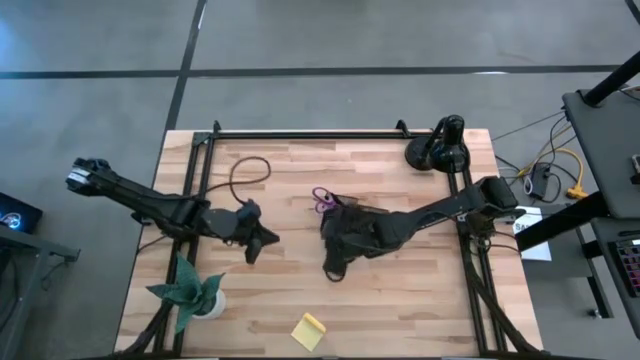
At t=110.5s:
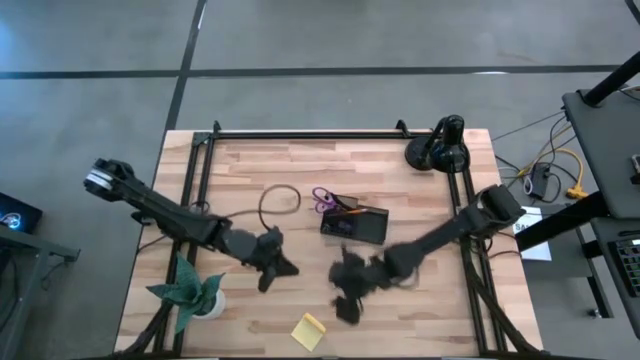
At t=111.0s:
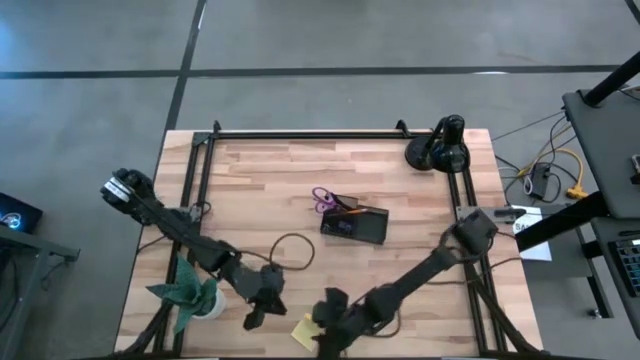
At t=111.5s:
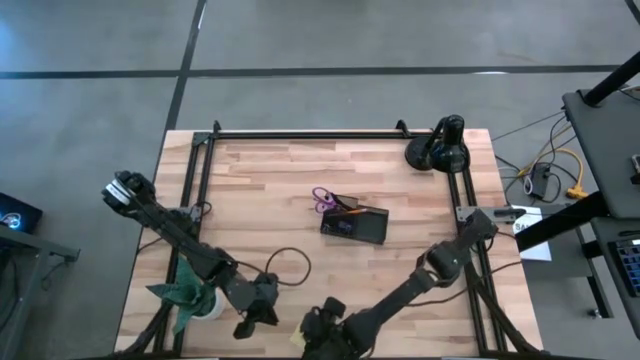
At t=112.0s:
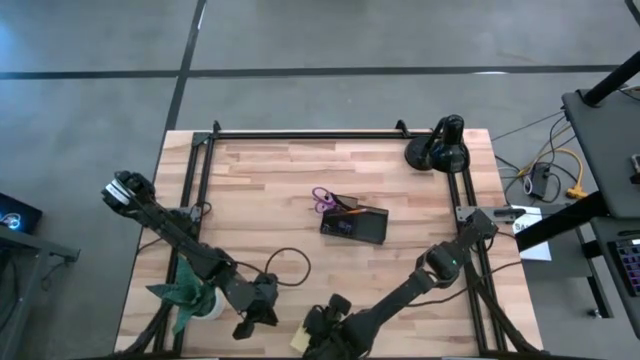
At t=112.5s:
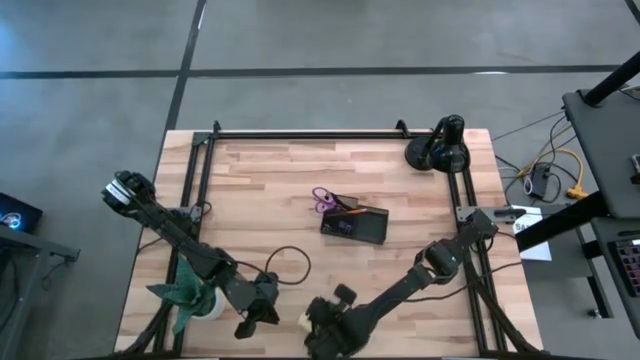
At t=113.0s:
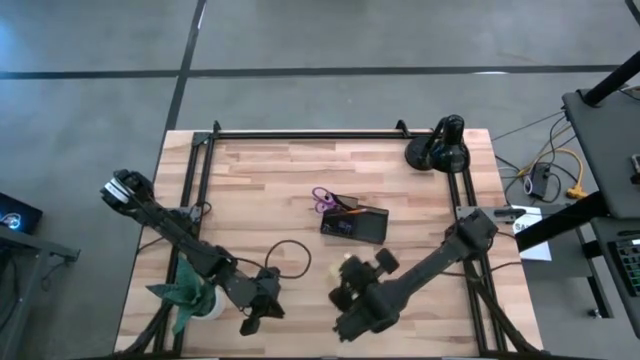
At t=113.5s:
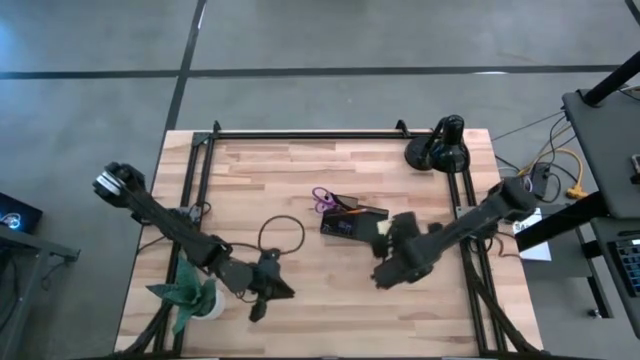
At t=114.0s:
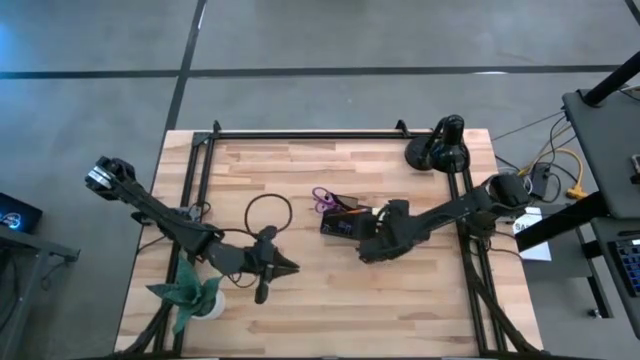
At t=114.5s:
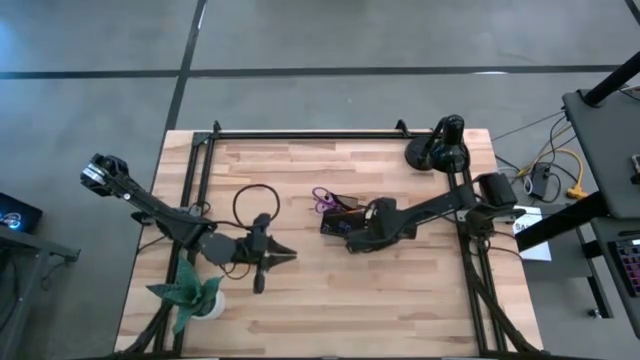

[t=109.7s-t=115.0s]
Task: Pick and place office supplies into organizer
Put the yellow sticky notes into the black desk organizer

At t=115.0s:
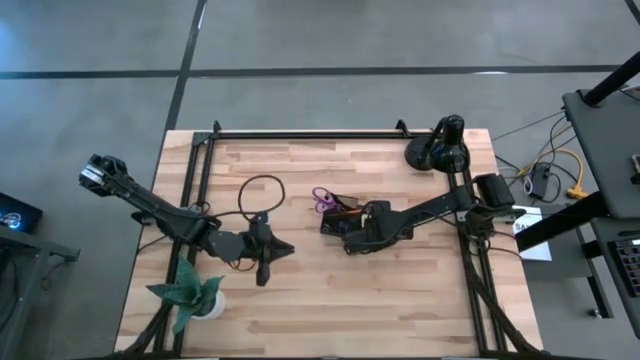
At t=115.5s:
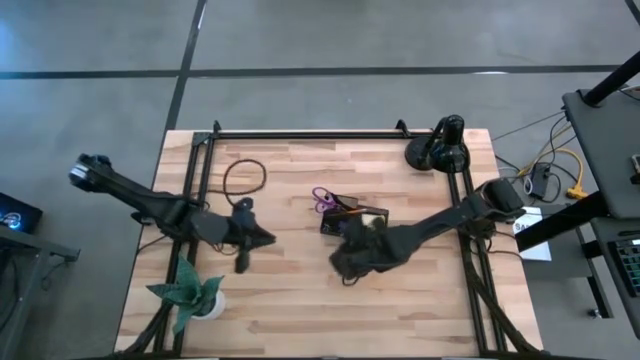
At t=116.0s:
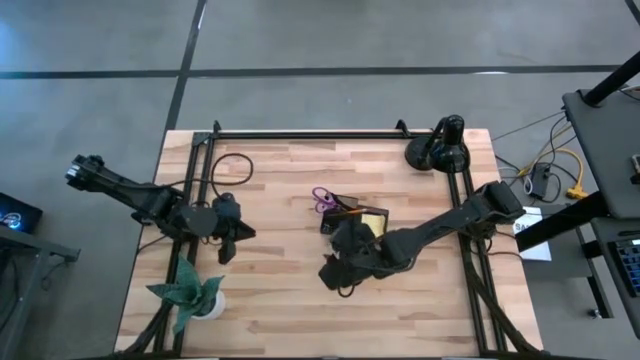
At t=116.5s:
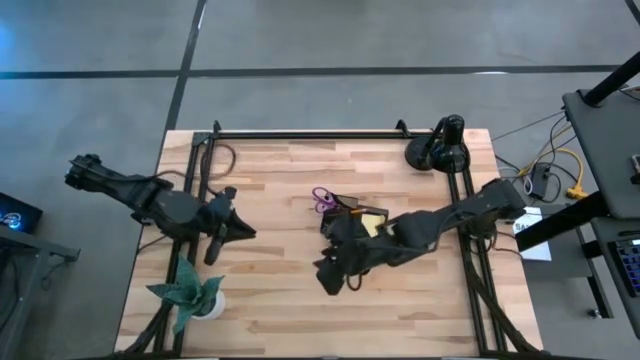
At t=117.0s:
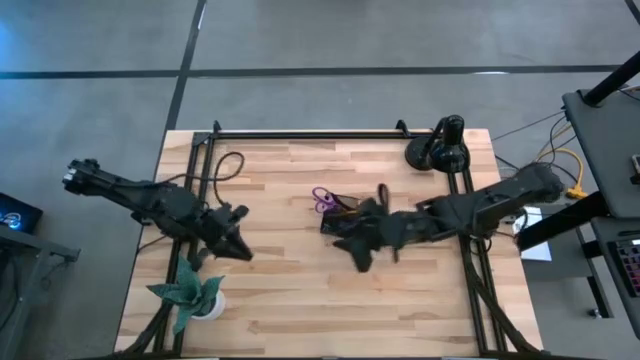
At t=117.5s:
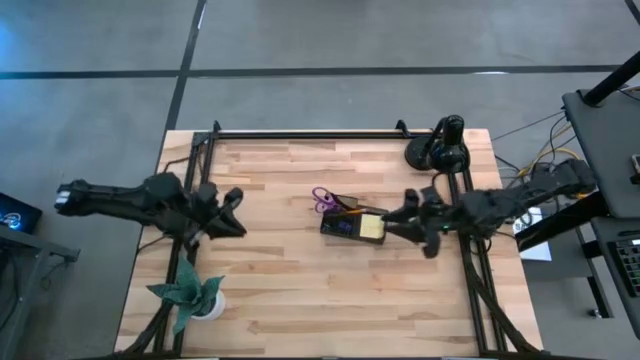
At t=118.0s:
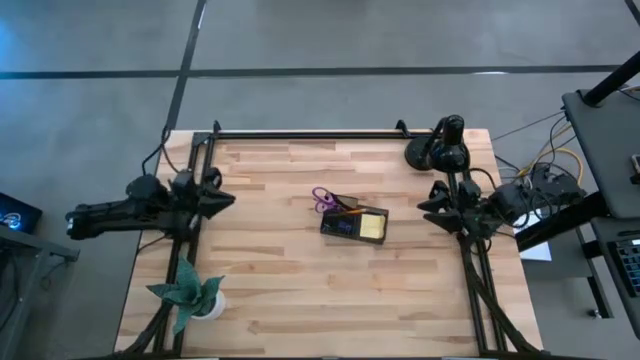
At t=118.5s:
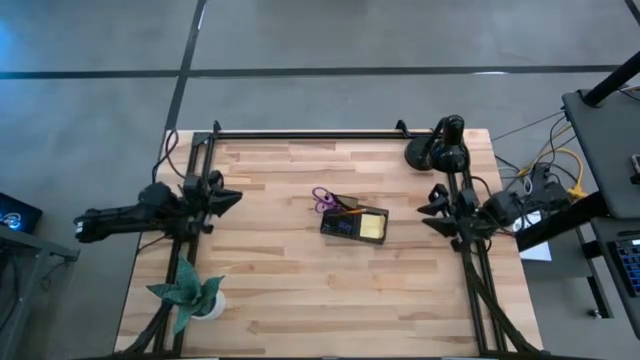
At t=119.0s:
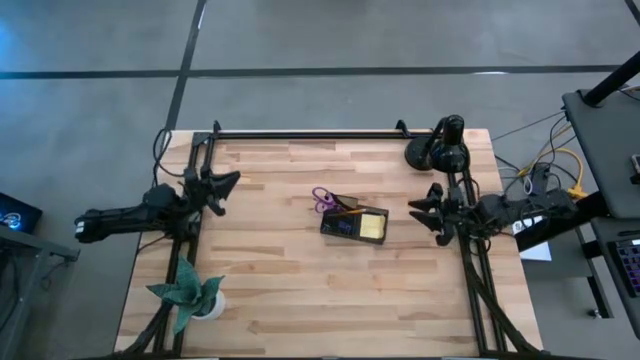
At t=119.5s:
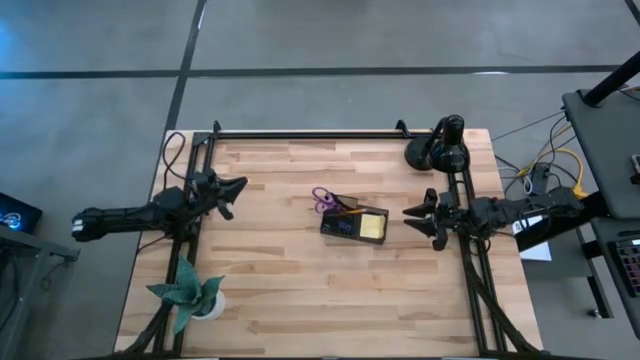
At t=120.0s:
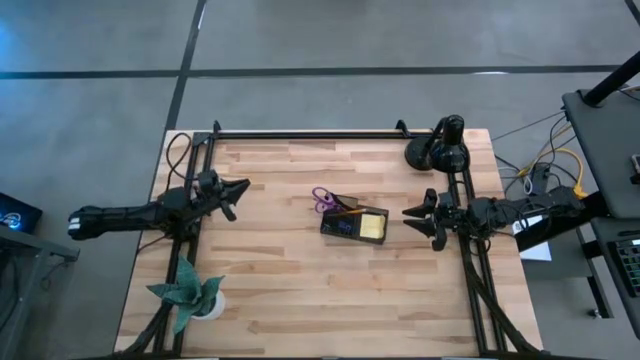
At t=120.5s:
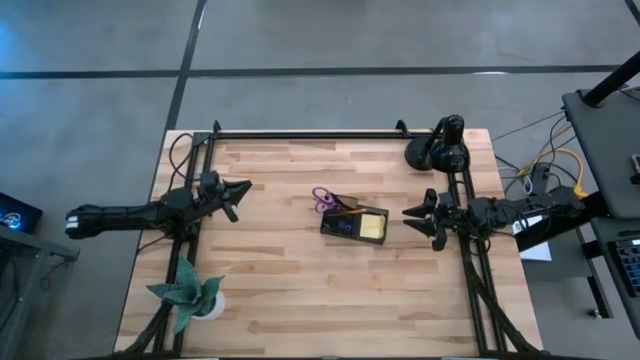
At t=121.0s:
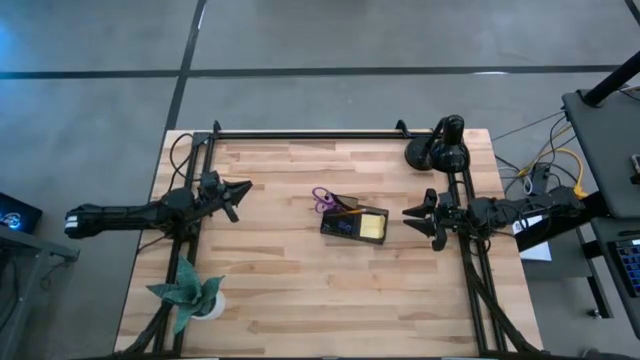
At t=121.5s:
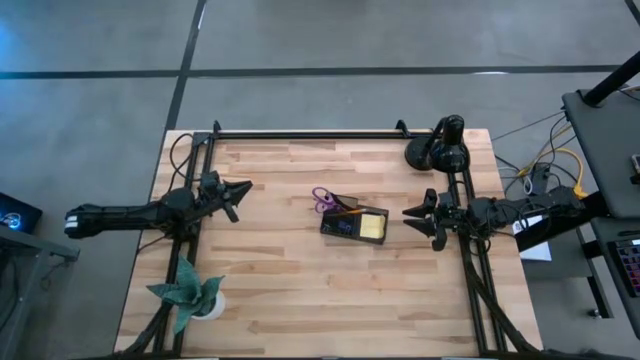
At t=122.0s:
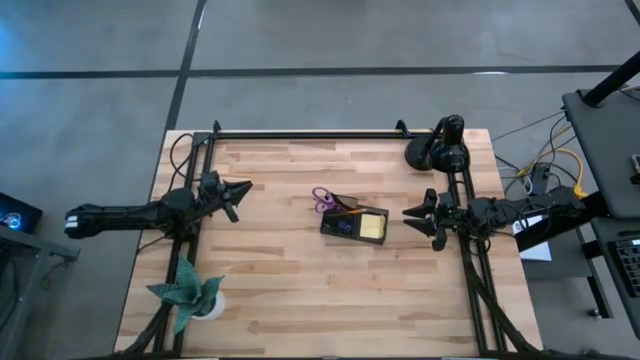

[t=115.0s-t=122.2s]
Return to Home Position

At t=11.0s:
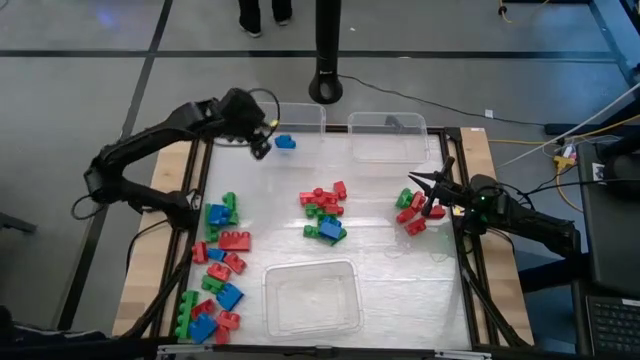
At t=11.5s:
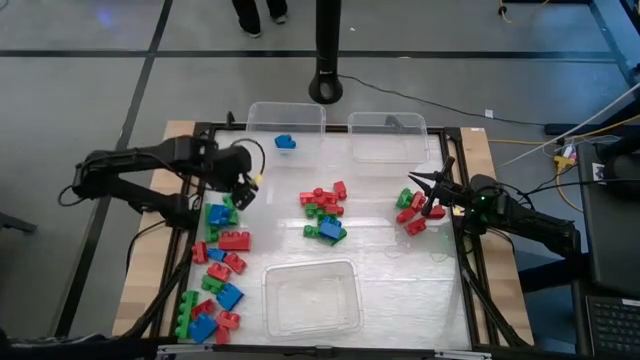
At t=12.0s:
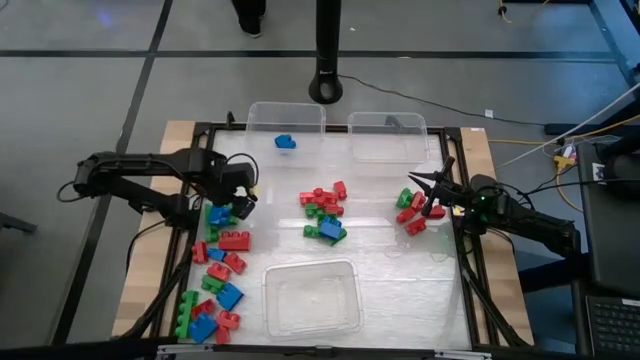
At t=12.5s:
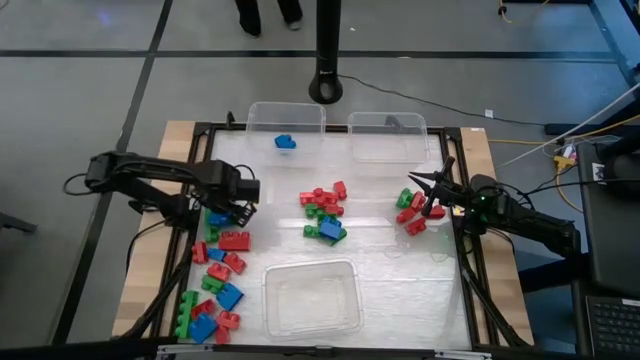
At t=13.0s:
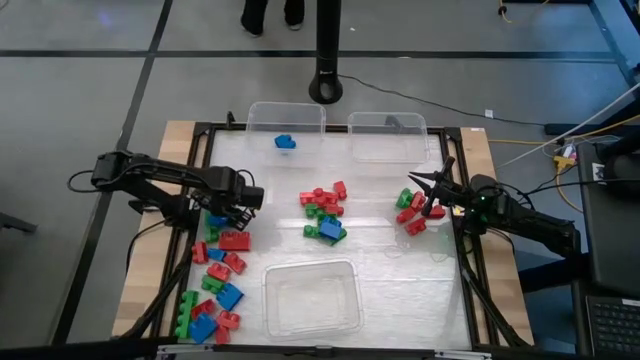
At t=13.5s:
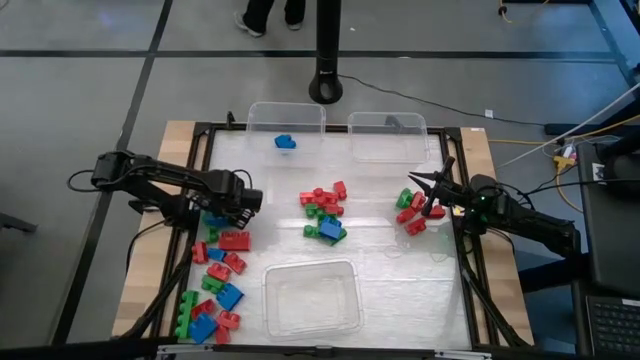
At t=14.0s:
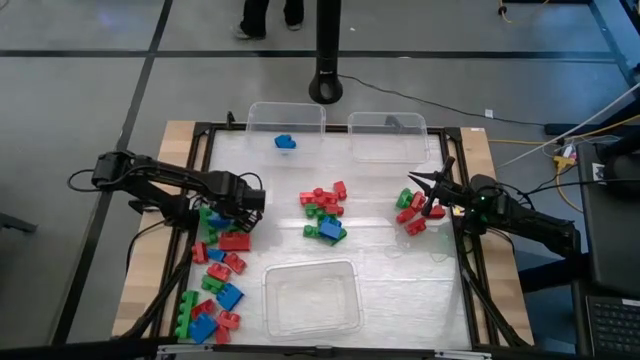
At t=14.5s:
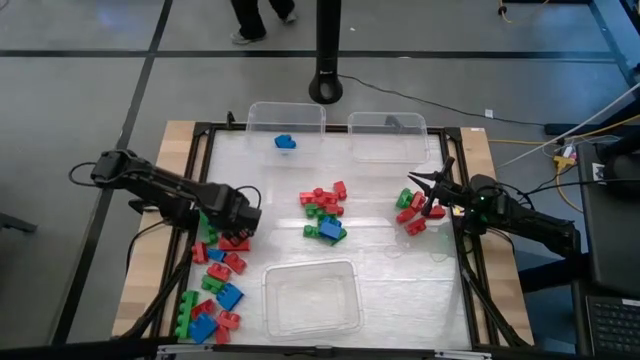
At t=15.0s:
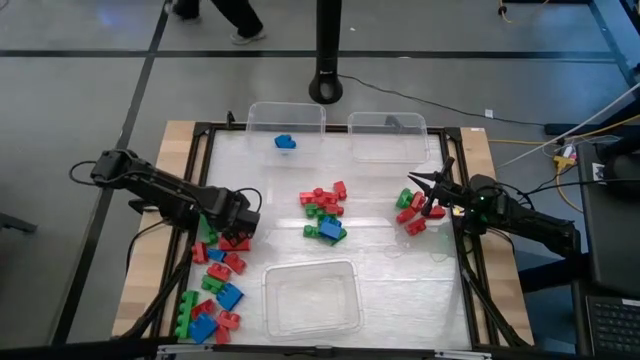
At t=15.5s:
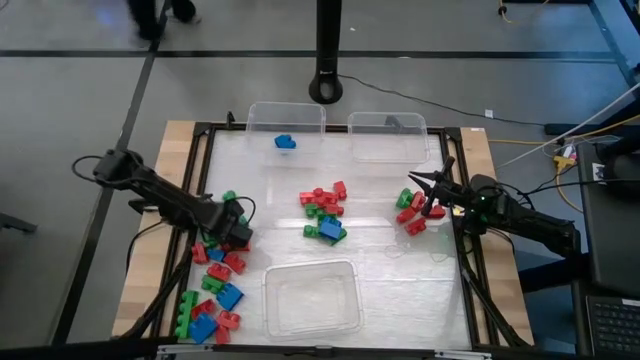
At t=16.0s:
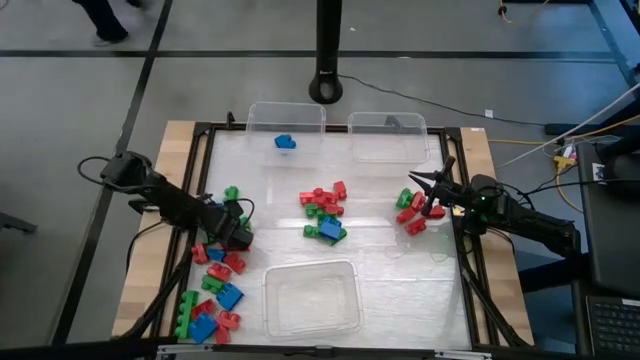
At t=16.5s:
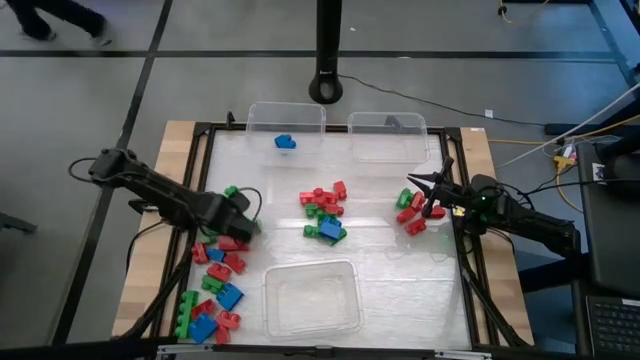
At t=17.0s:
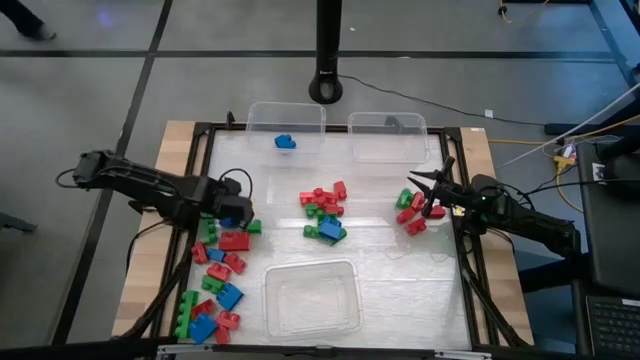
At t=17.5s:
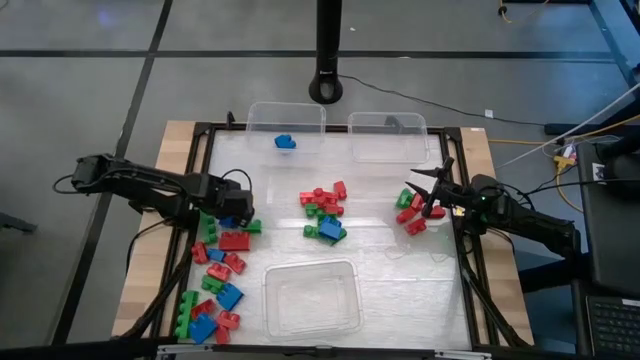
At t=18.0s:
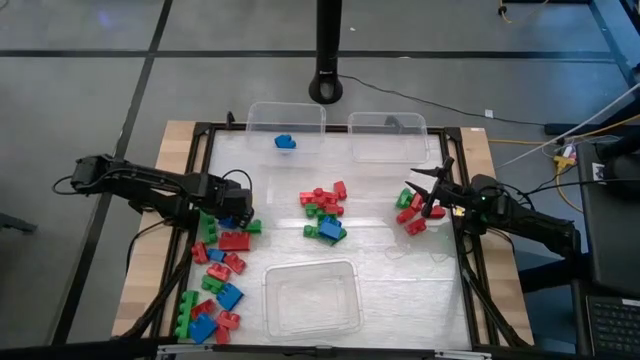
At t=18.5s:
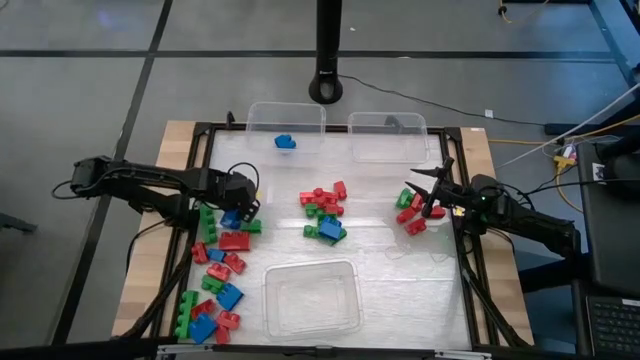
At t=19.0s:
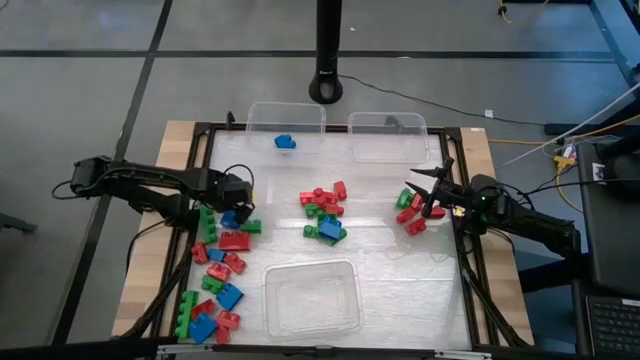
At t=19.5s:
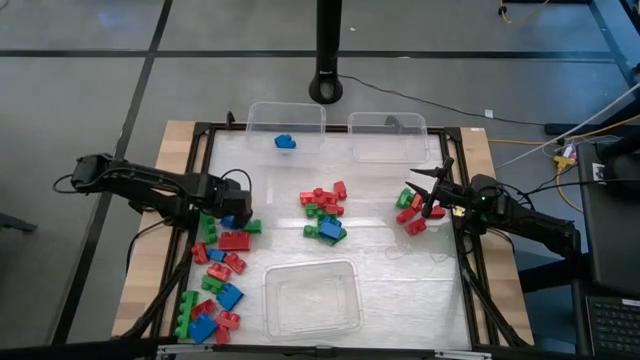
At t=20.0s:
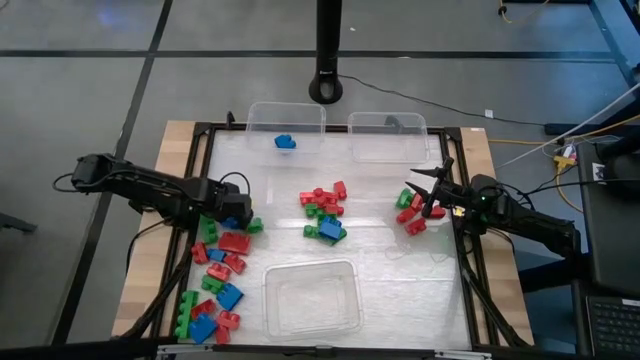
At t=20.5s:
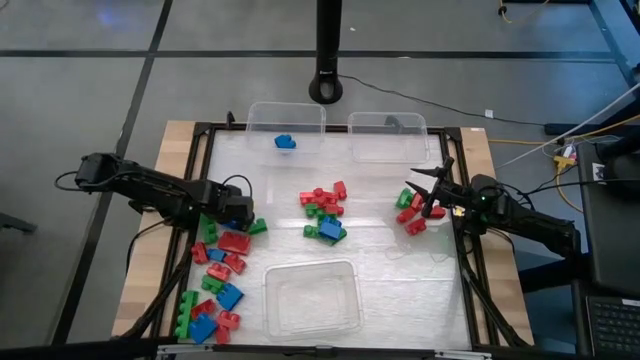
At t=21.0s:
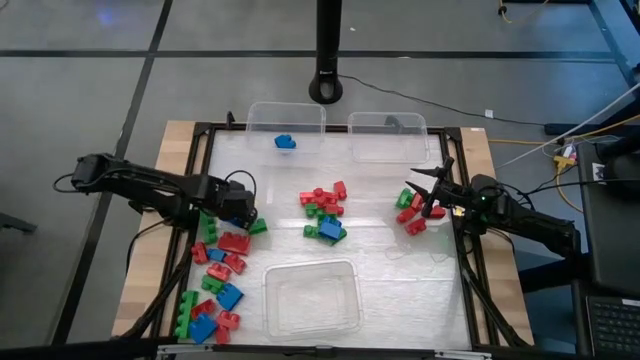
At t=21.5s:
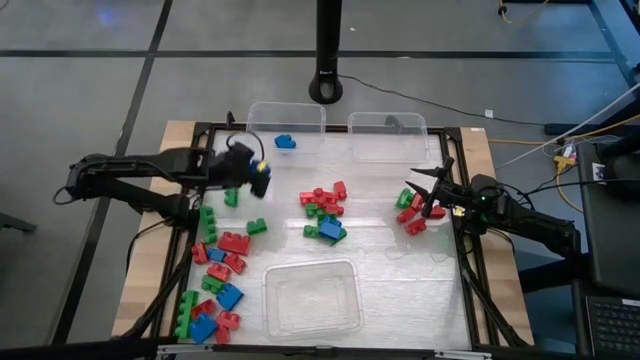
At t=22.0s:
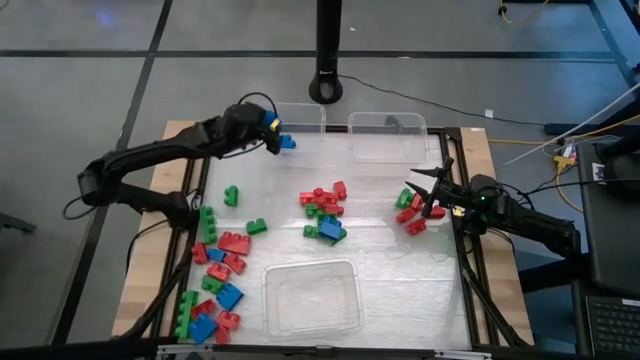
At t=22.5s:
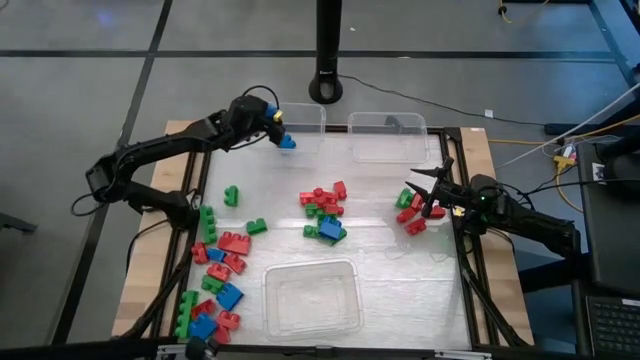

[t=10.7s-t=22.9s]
Task: Sort blocks
Put the blue game piece into the top left transparent bin
